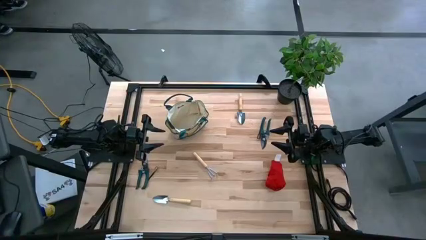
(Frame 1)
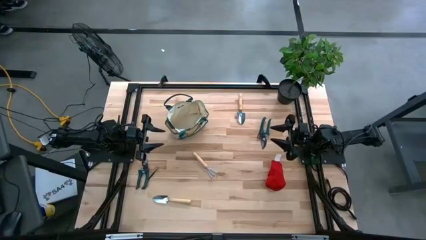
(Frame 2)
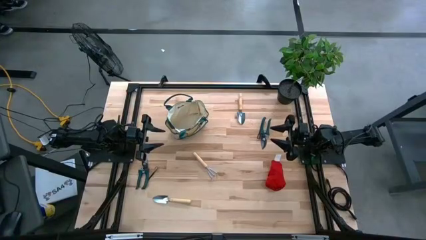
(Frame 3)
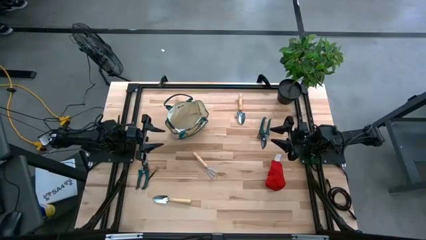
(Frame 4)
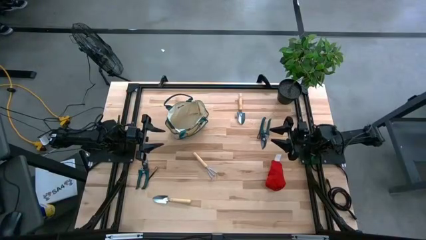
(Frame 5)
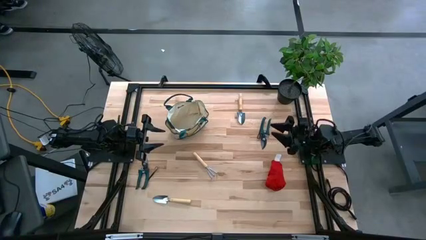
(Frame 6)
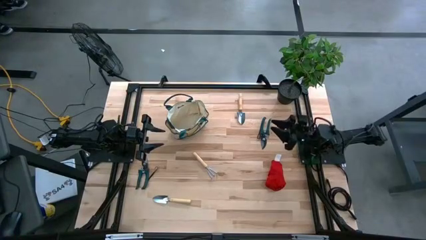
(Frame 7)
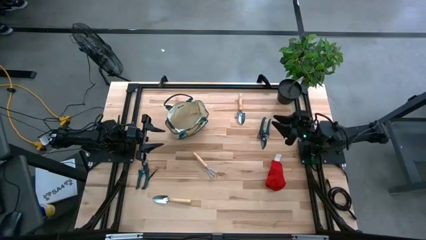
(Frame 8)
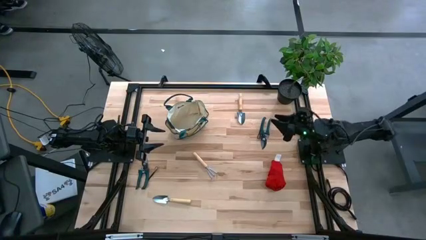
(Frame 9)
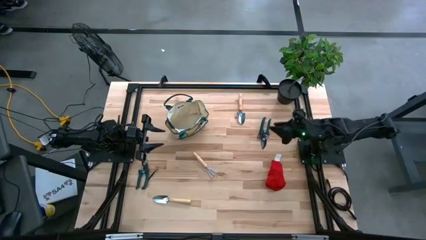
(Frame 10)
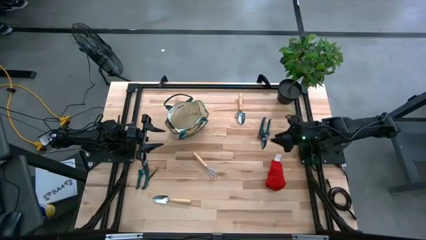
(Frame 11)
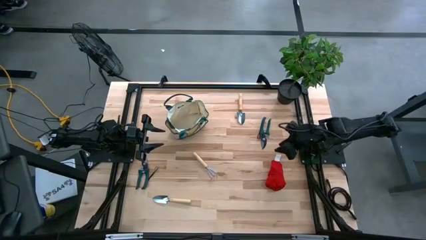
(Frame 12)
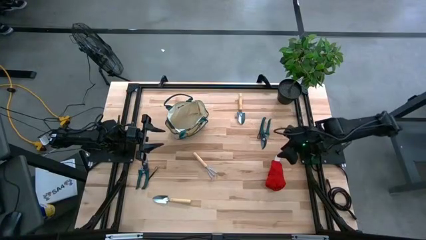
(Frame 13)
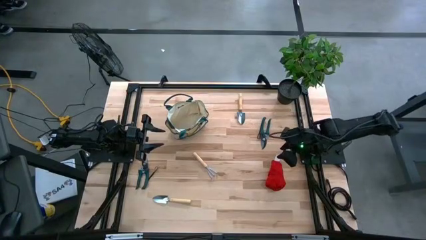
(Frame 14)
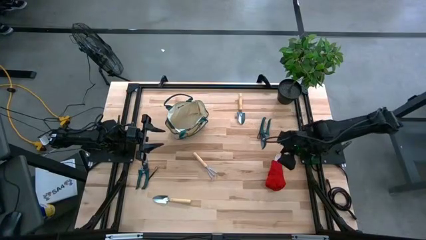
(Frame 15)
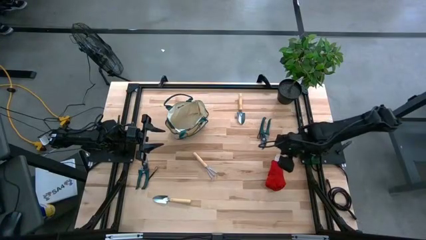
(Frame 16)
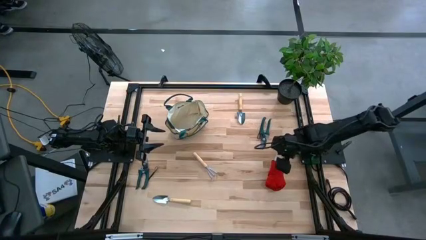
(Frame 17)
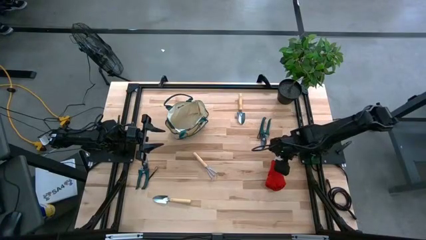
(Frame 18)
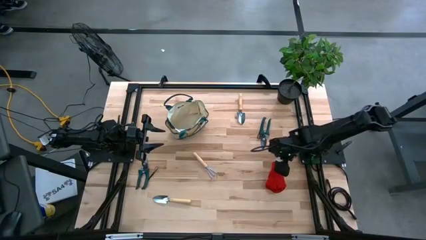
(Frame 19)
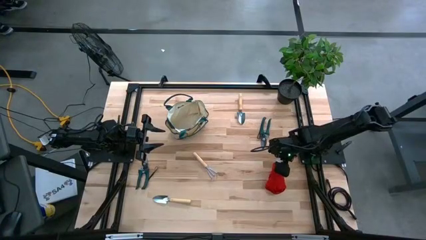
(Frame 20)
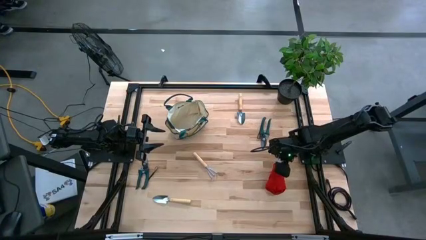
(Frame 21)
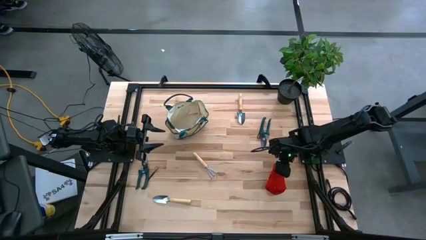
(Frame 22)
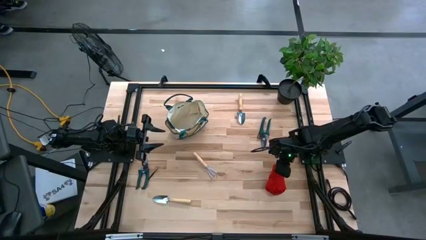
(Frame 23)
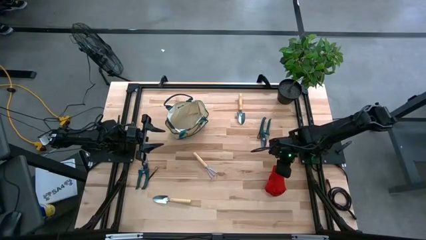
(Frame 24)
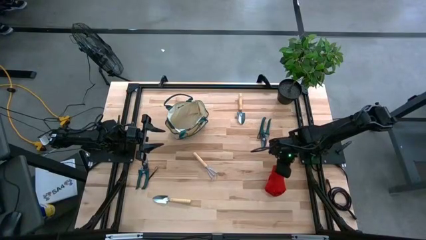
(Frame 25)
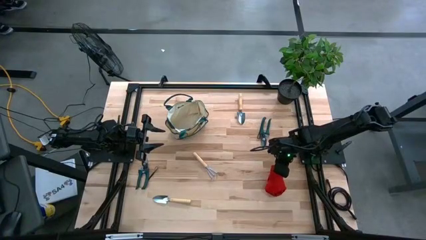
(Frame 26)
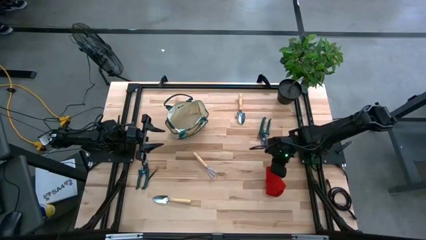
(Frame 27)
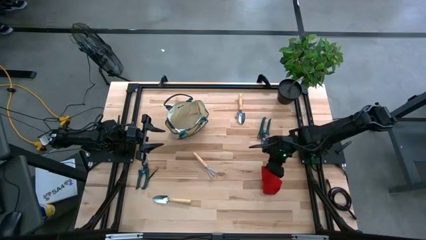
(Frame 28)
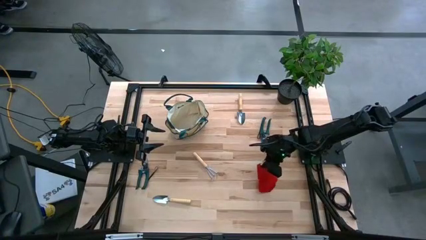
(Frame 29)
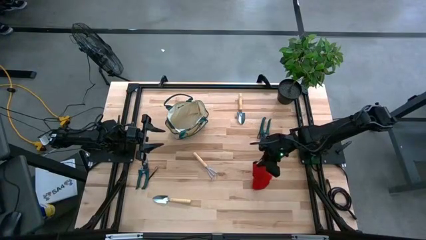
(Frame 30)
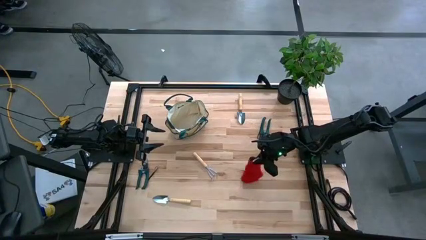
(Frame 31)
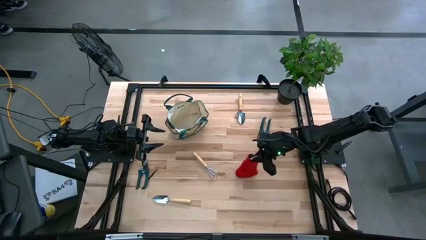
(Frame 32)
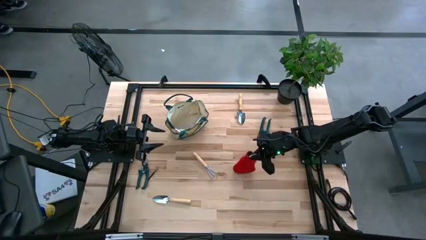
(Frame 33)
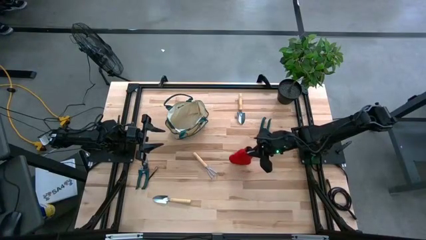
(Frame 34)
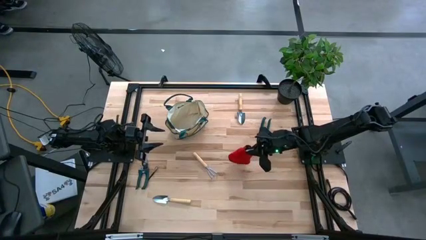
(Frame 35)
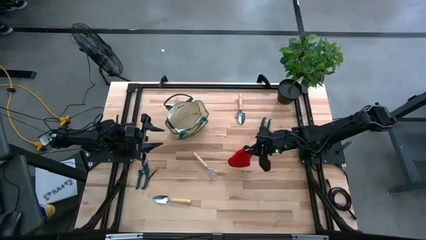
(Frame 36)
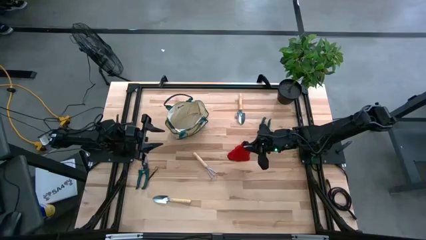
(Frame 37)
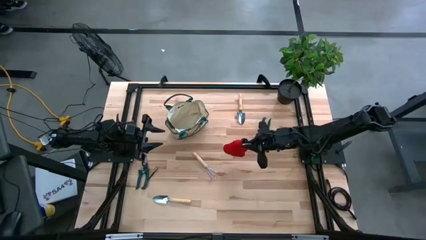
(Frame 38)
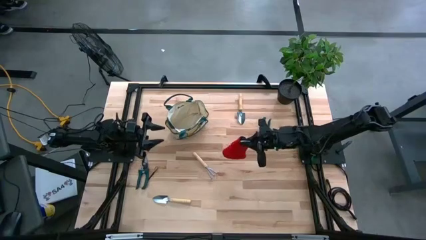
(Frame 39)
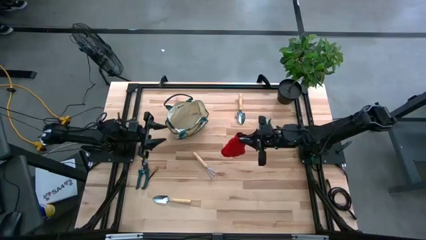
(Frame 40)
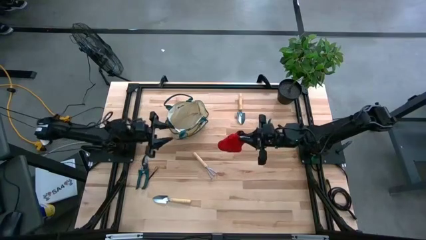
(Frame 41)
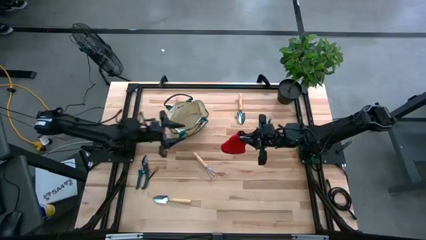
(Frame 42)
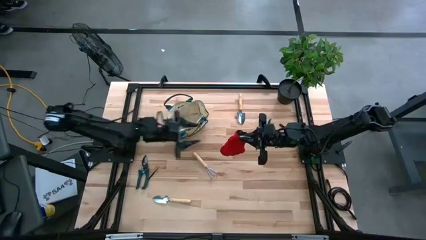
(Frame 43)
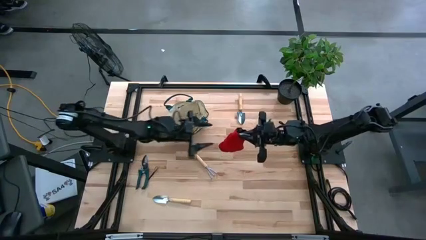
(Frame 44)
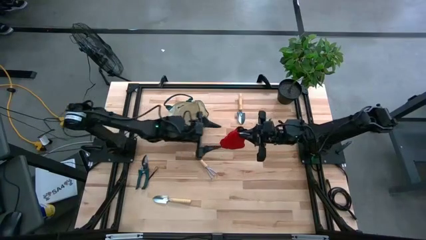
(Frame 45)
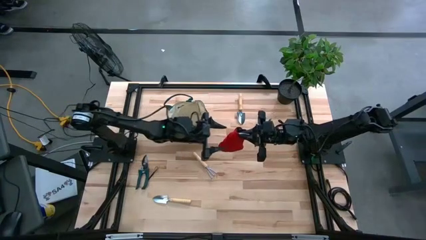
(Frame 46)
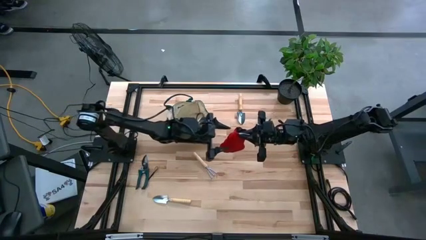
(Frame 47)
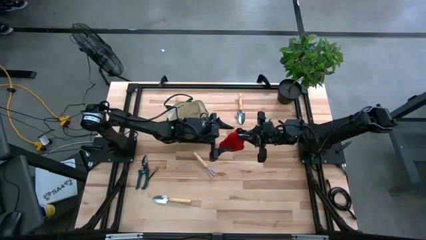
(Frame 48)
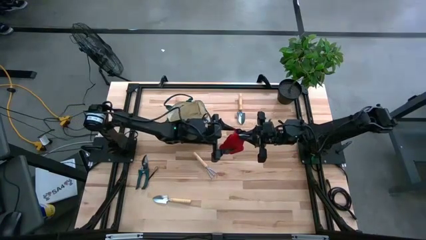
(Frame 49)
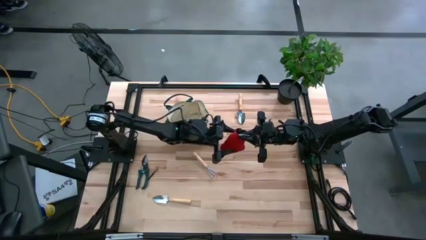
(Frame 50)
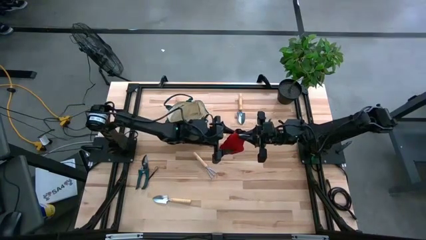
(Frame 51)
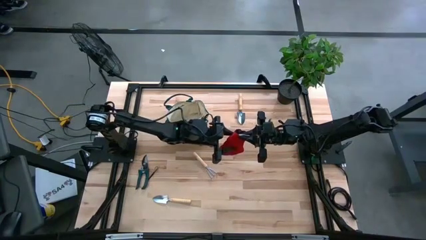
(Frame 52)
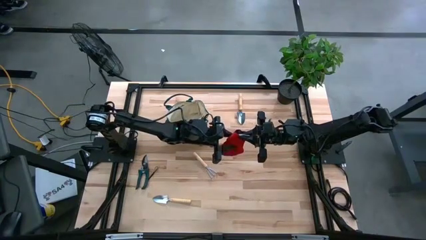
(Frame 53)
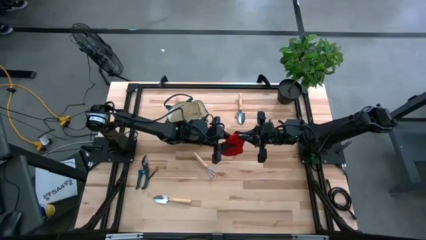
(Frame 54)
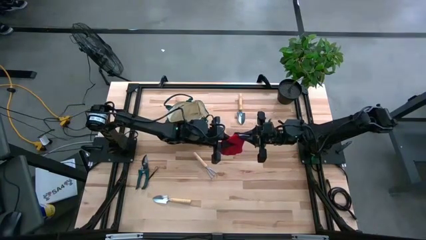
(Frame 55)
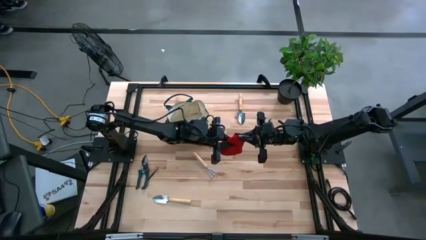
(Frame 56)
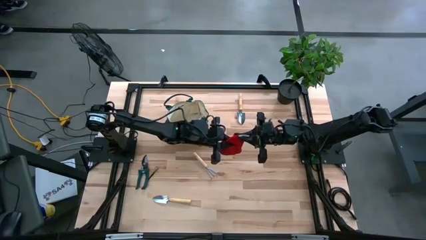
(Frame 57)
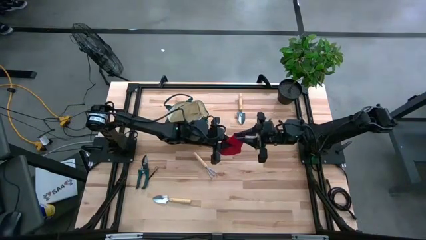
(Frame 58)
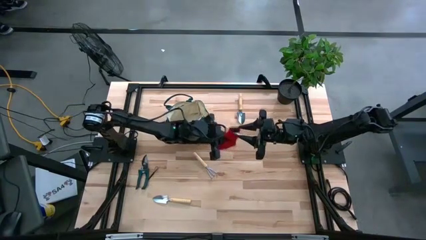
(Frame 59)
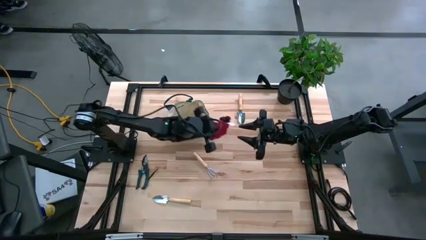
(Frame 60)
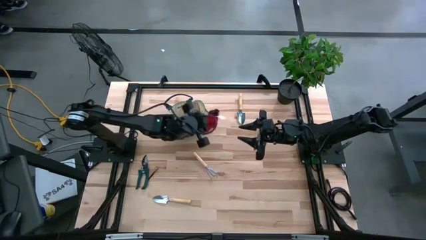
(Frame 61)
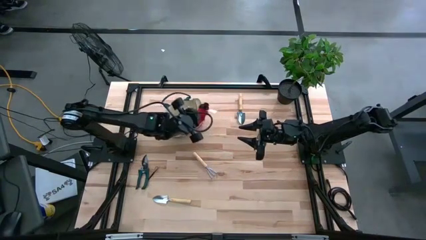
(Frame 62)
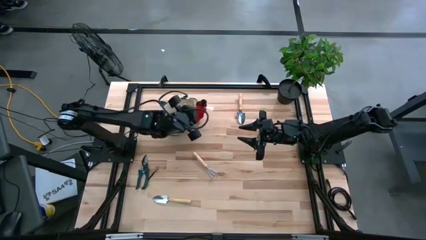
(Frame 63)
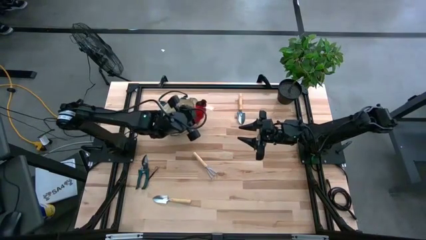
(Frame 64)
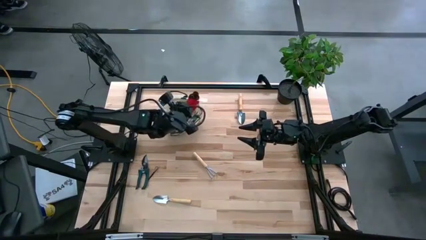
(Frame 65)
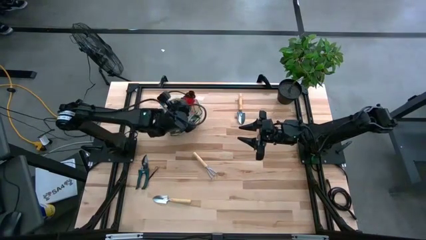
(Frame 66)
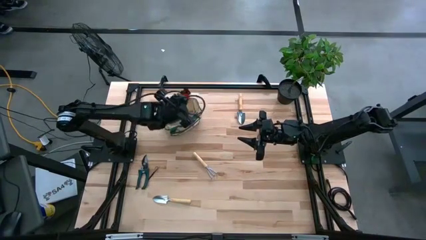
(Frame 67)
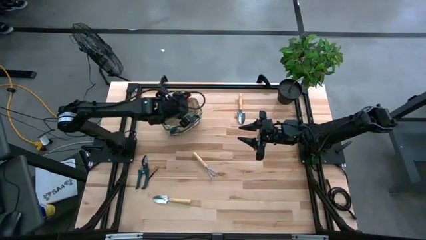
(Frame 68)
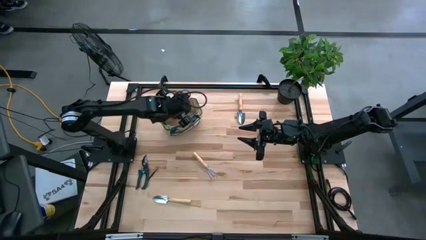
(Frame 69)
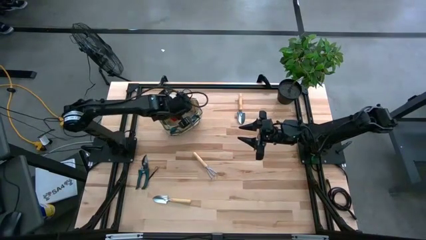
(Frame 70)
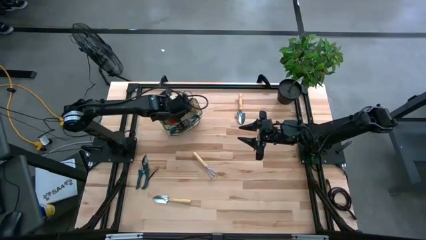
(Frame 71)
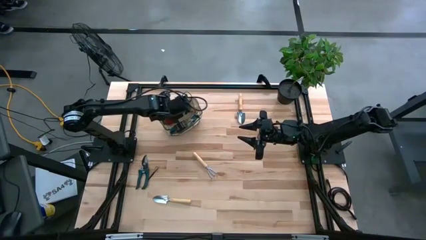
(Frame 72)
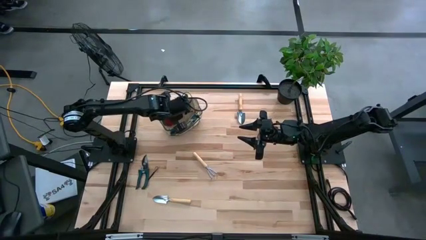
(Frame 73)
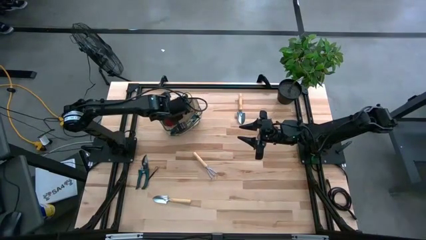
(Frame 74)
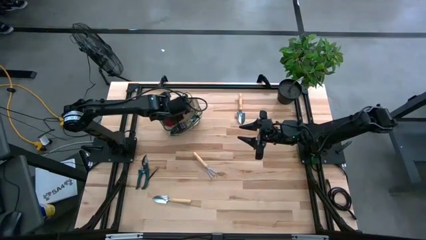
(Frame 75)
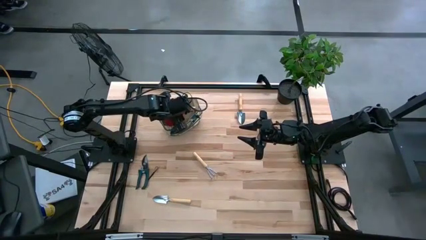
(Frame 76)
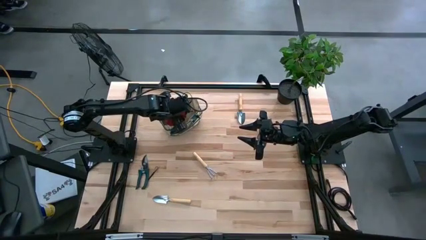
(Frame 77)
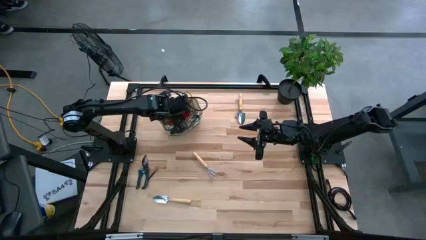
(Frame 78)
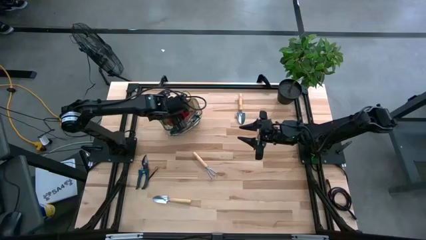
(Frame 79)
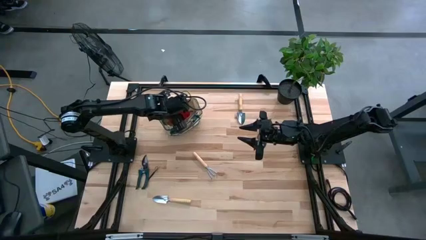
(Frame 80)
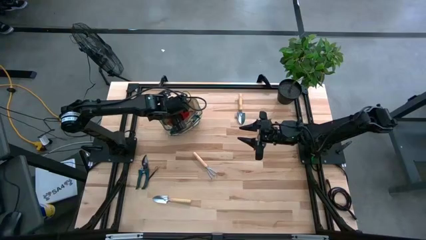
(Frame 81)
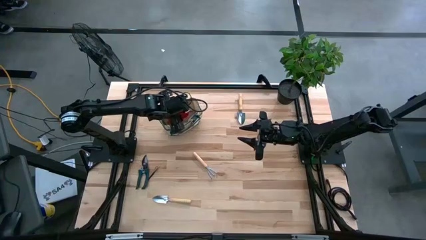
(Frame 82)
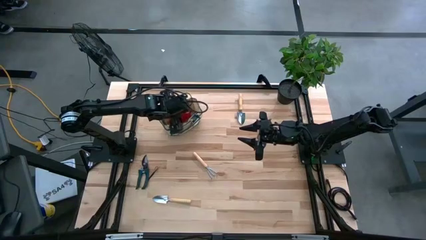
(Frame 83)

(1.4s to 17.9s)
Task: Pick & Place Garden tools in Gardening bag
Put the red gloves into the gardening bag
